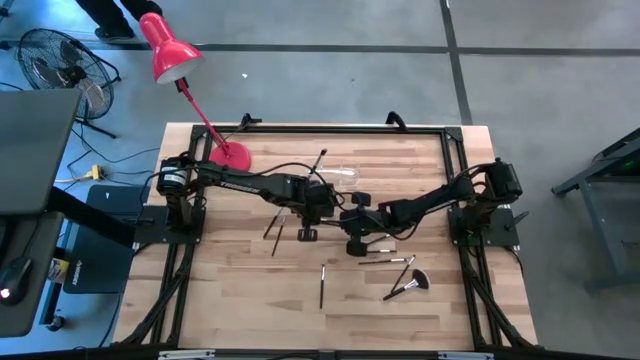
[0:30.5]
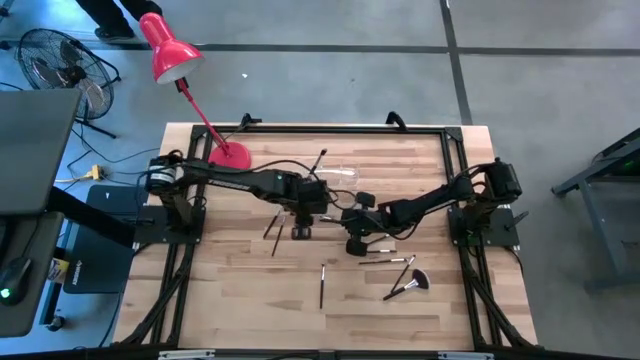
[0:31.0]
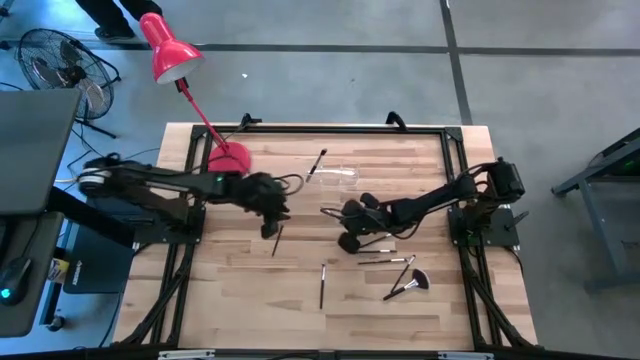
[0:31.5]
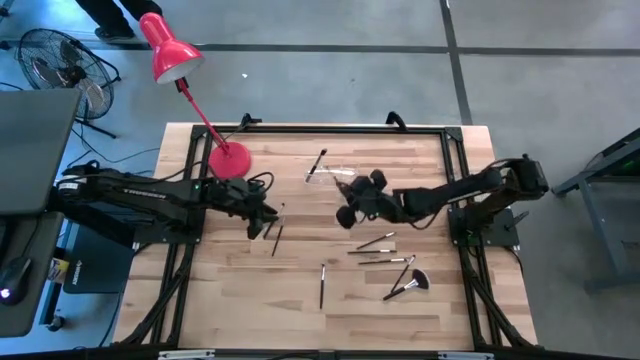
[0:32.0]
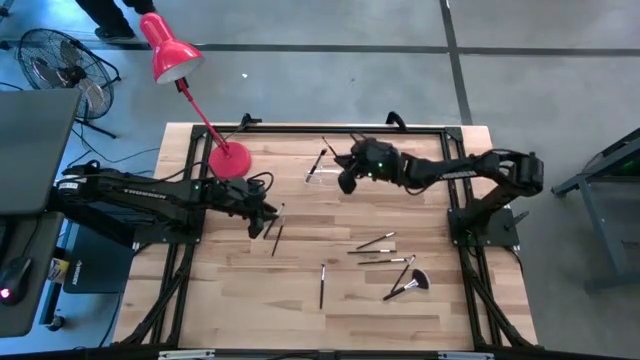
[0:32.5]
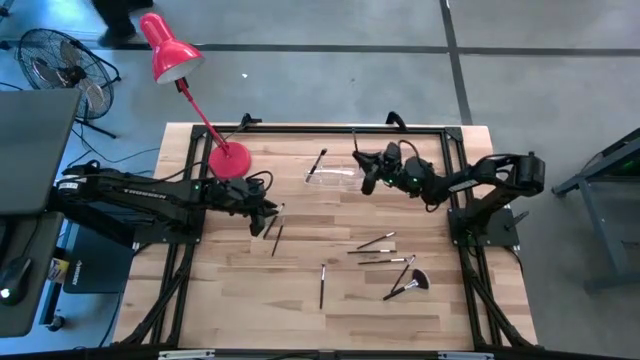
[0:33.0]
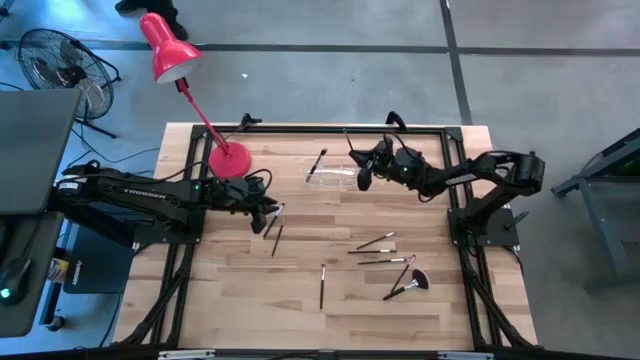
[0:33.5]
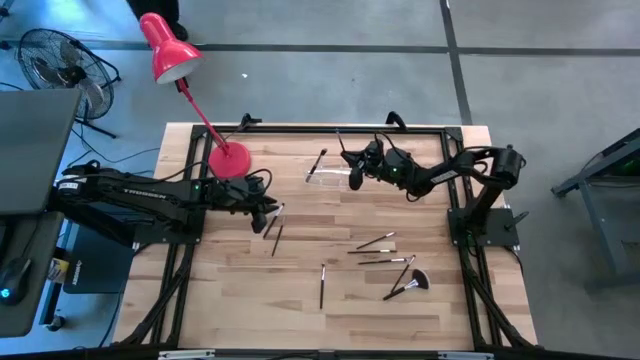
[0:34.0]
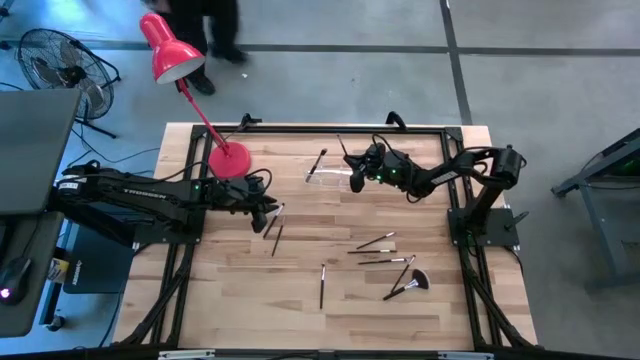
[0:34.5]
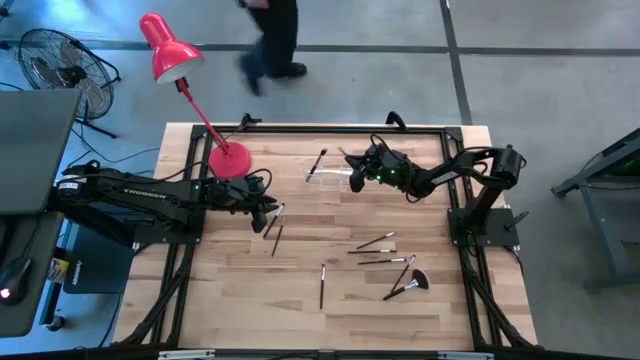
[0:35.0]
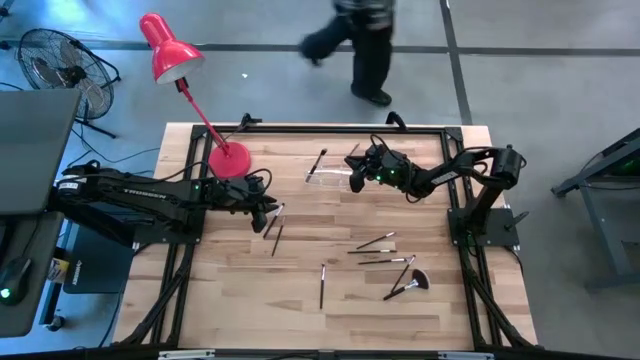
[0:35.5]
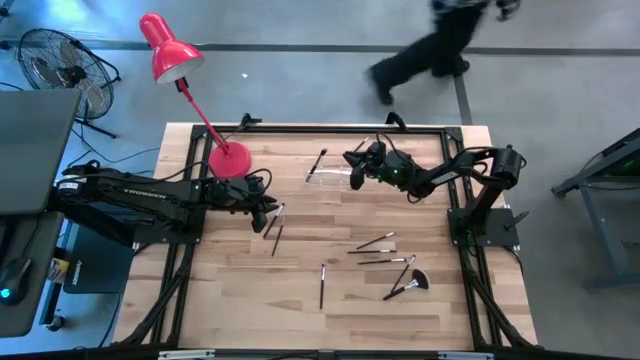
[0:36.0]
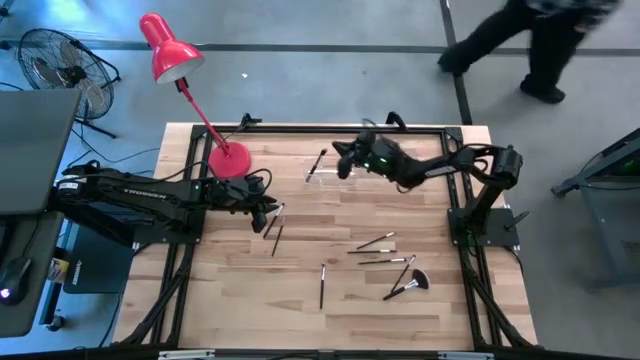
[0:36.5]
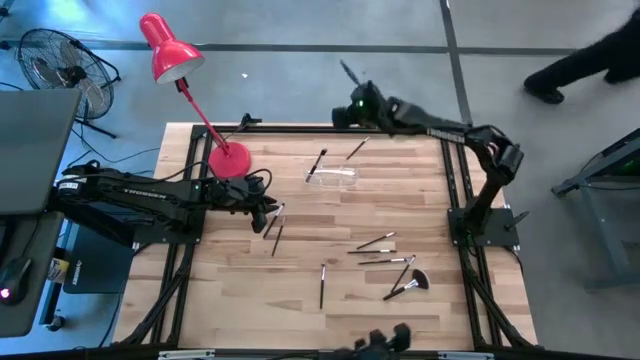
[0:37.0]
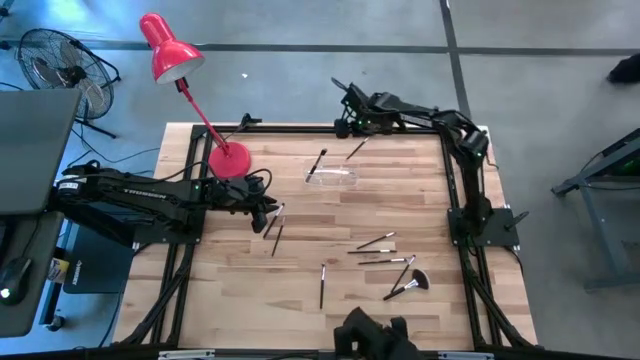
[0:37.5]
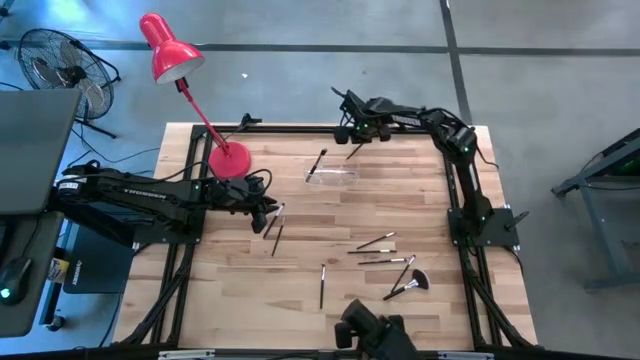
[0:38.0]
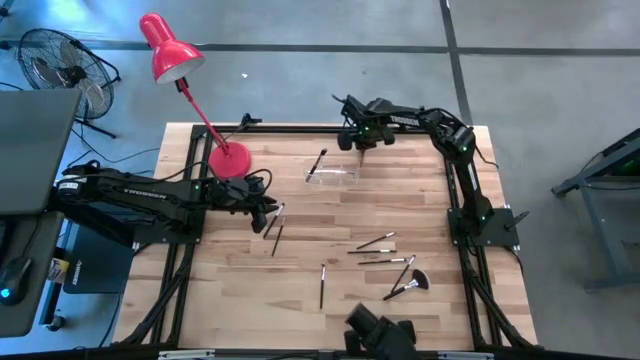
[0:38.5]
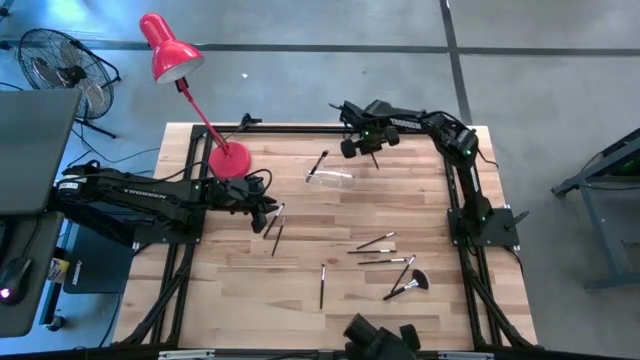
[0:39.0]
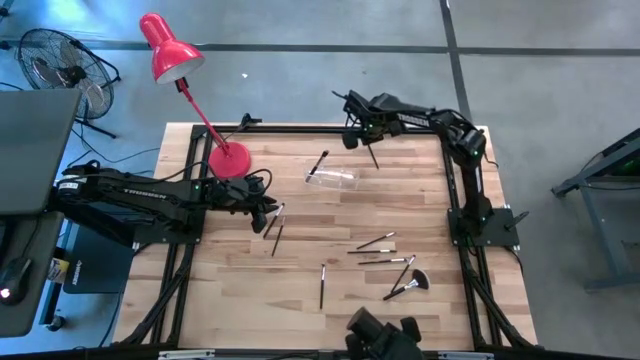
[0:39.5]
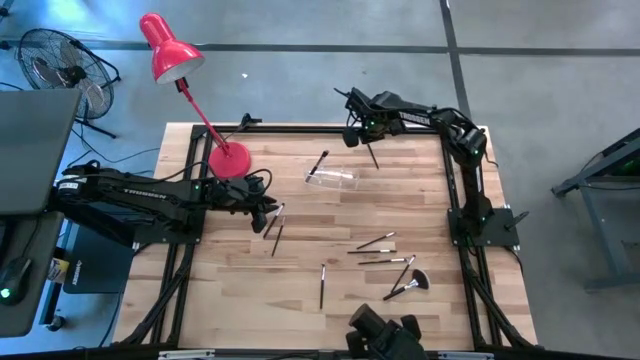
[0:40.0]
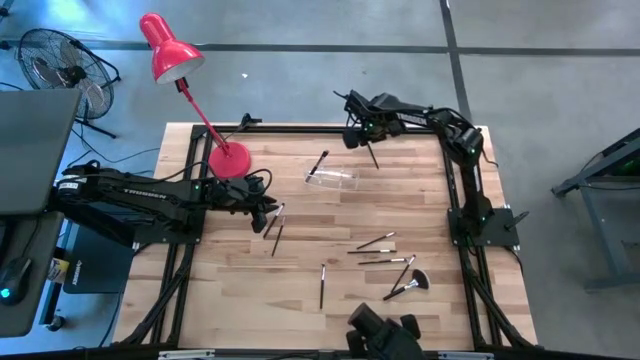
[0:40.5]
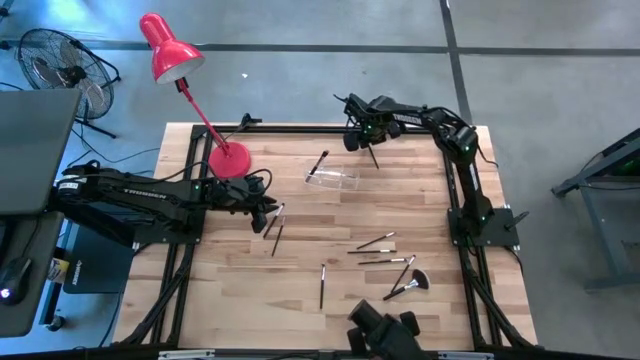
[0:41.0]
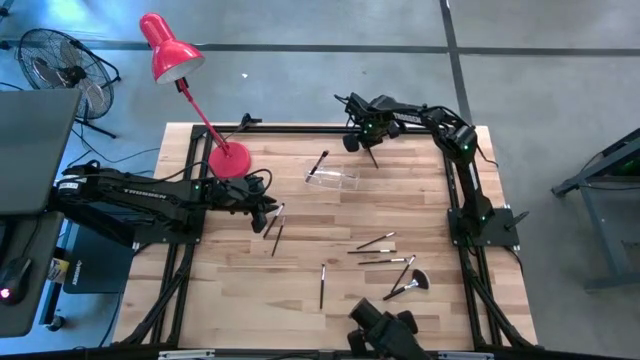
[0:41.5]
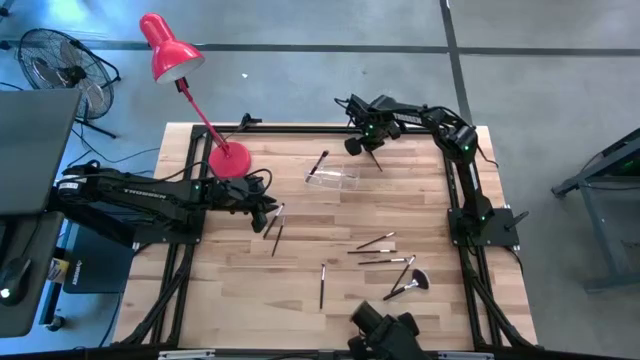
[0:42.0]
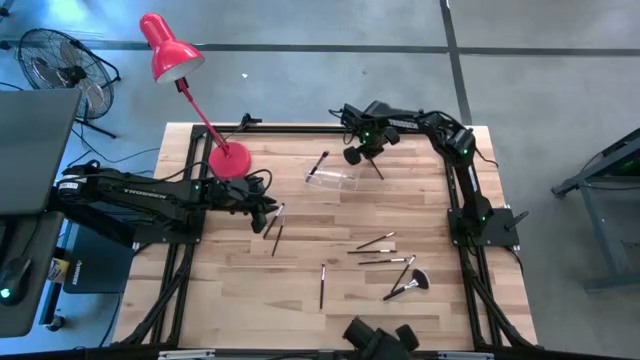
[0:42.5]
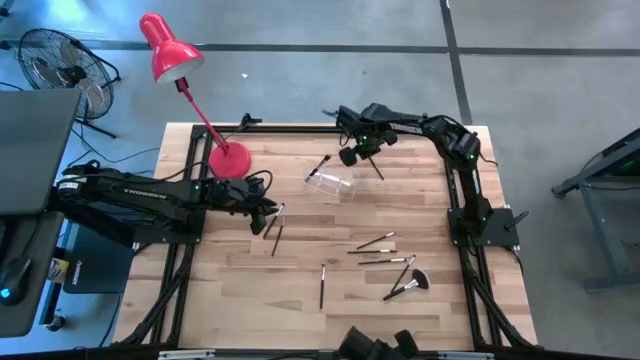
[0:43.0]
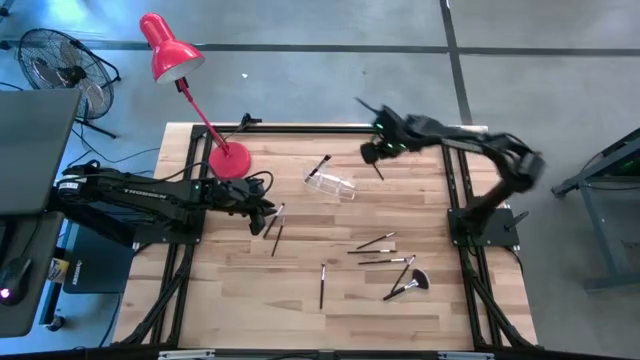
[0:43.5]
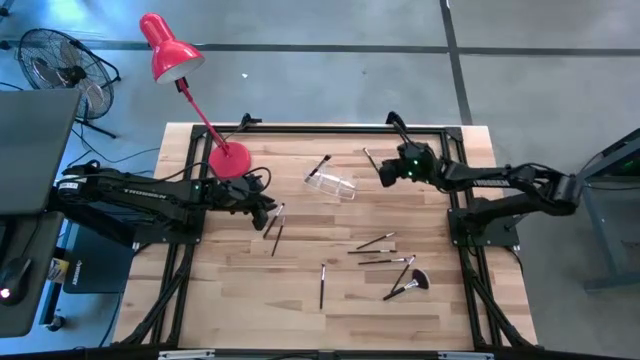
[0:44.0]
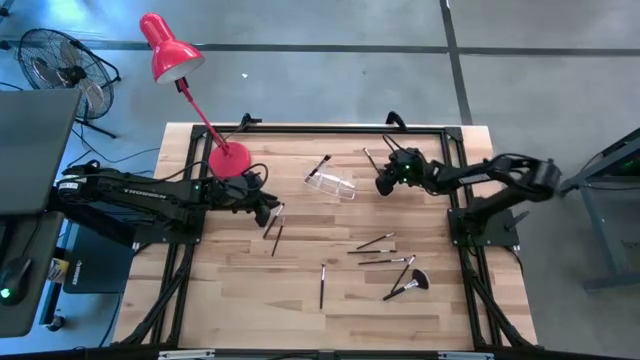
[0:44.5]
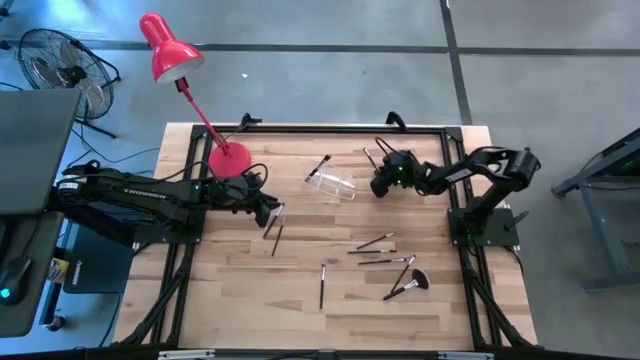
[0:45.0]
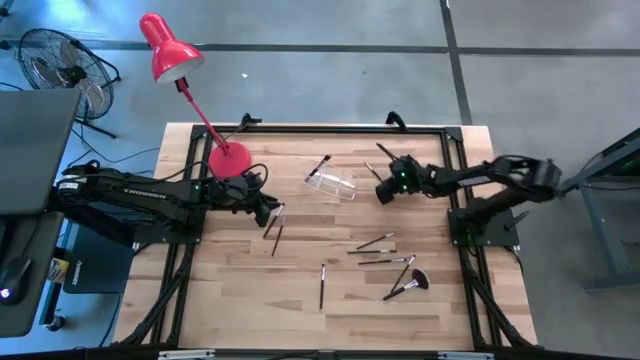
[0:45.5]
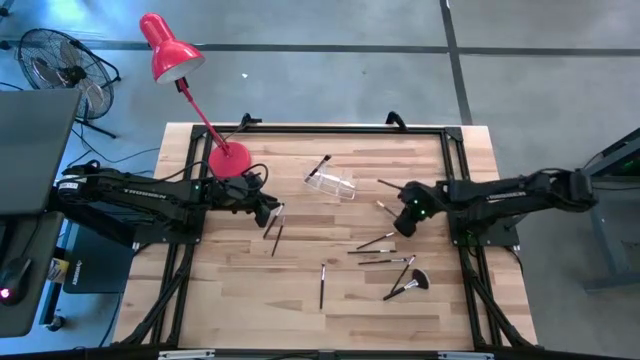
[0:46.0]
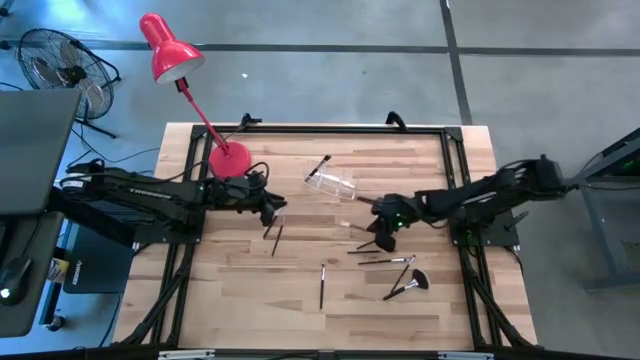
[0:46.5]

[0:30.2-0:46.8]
Task: Put items in baskets/containers
Put the eyeshadow brush into the transparent organizer

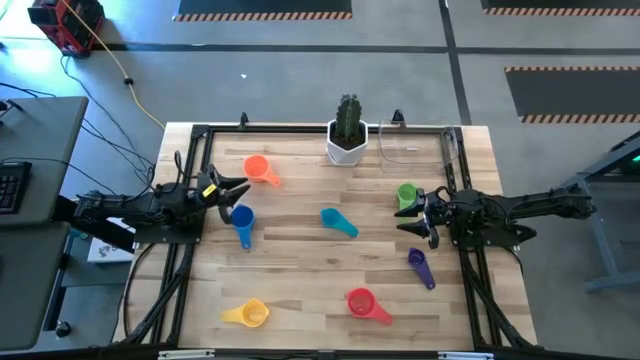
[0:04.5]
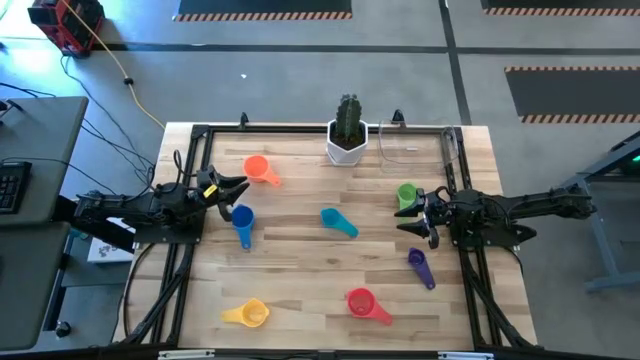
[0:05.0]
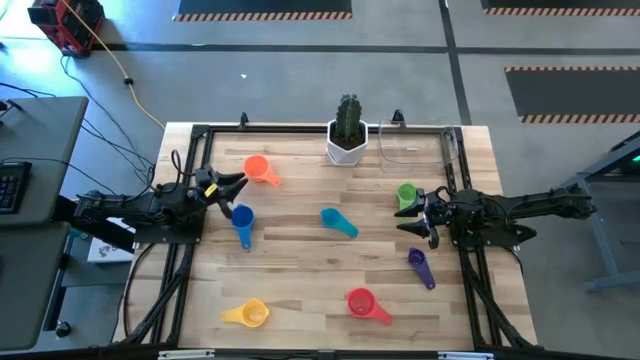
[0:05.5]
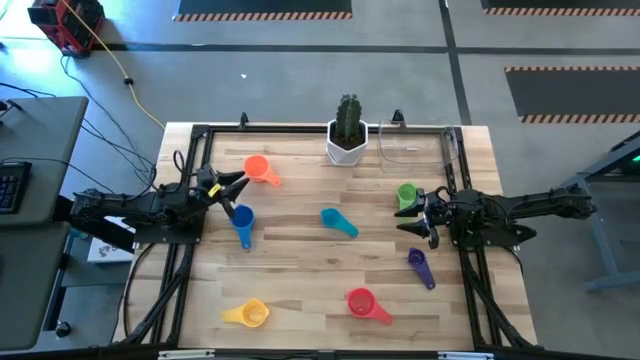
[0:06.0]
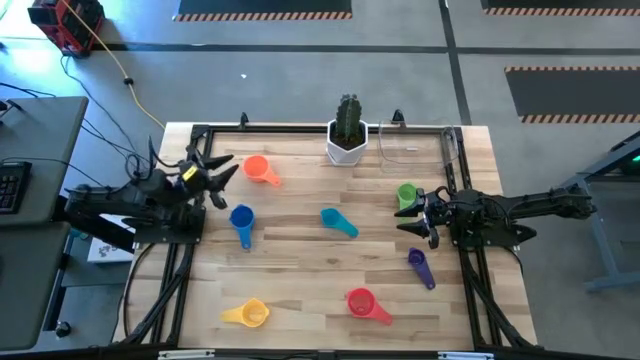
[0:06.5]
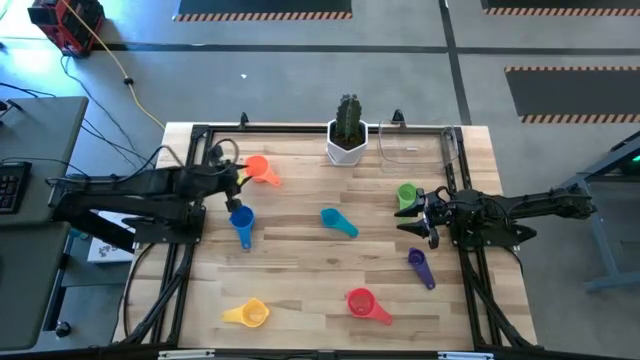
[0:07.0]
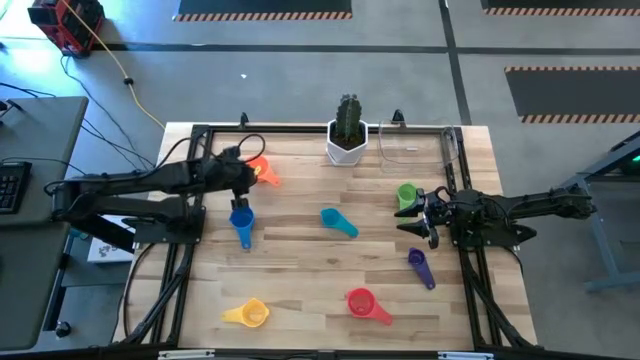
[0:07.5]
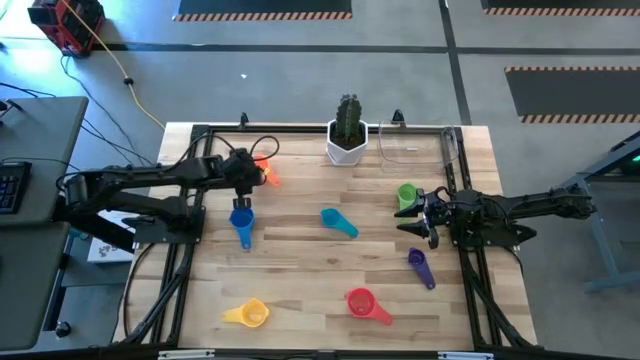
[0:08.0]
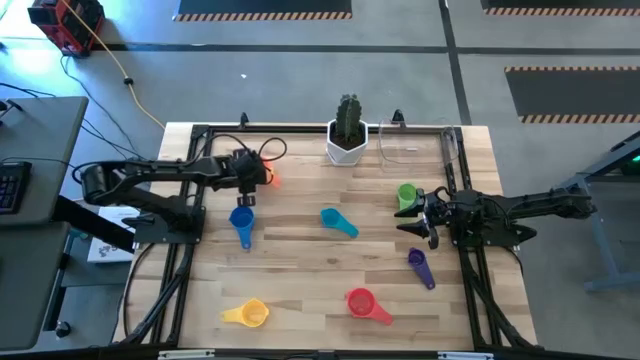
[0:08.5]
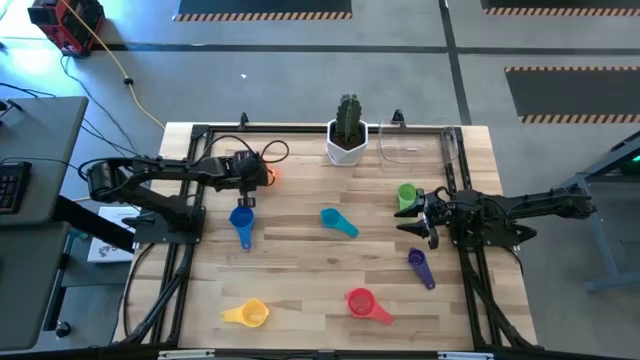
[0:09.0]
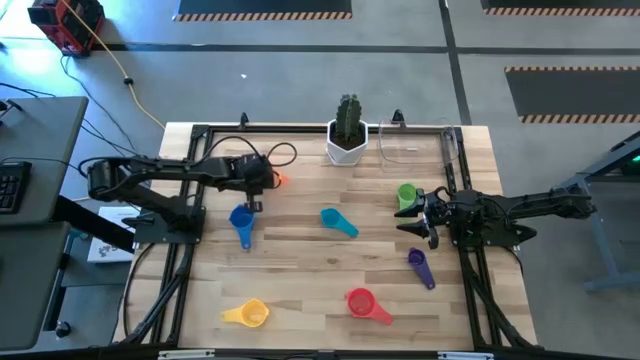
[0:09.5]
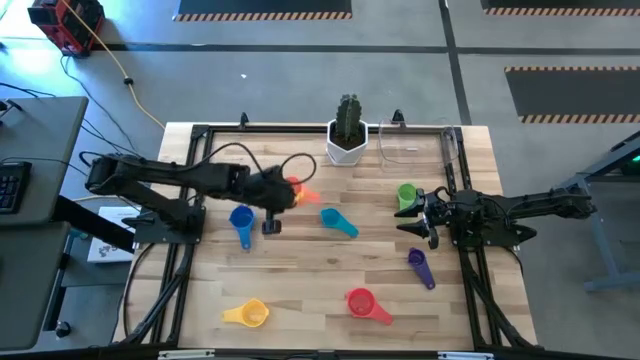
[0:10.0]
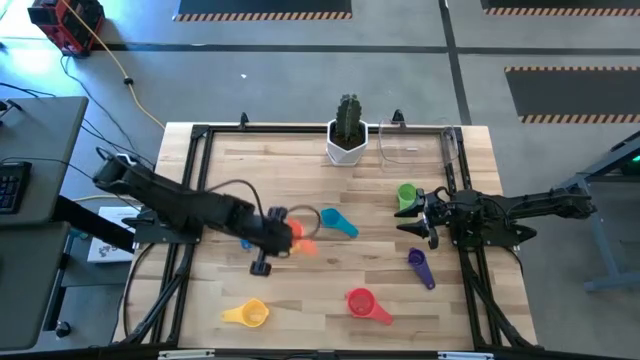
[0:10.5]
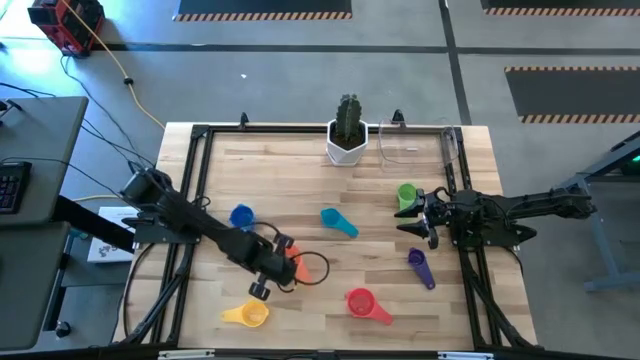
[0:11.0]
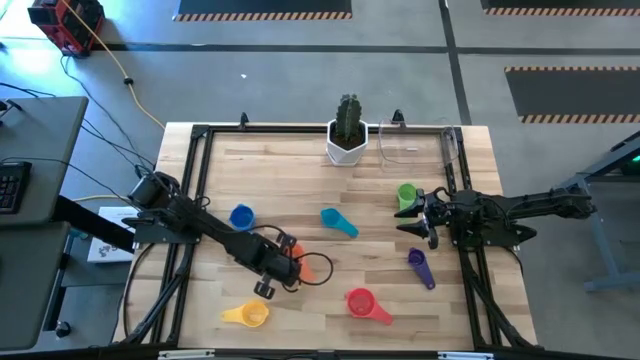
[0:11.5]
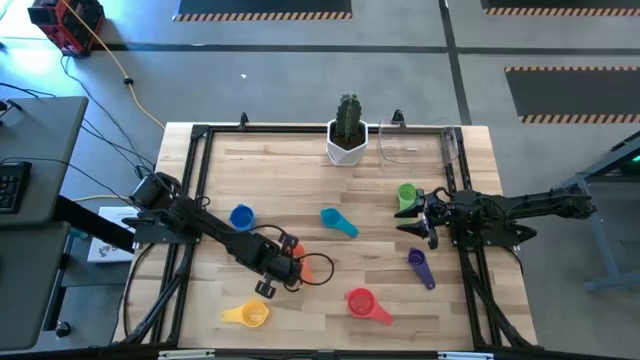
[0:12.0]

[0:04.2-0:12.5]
Task: Nest measuring cups in basket
Move the orange measuring cup to the center of the table
